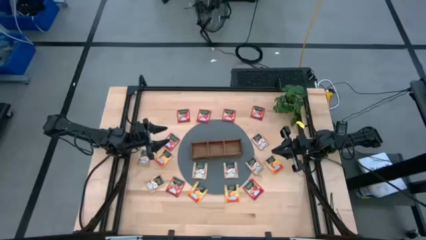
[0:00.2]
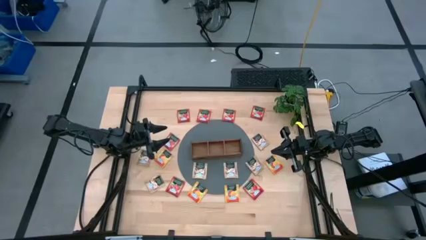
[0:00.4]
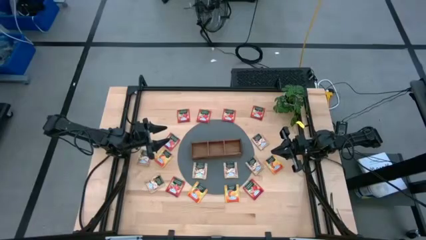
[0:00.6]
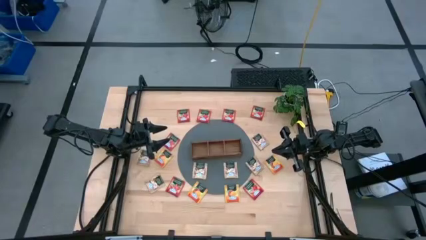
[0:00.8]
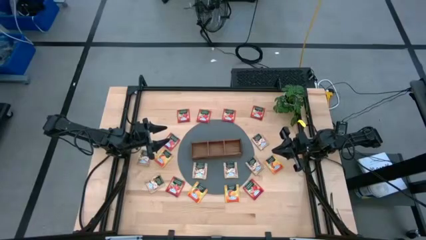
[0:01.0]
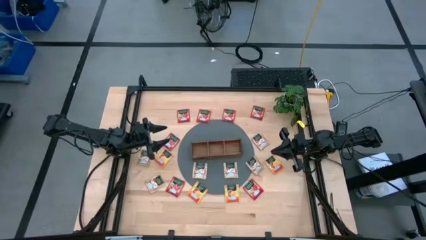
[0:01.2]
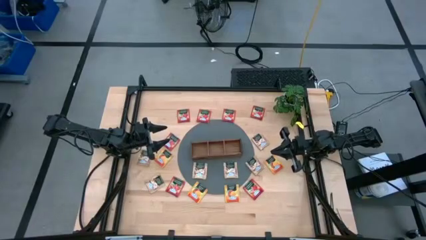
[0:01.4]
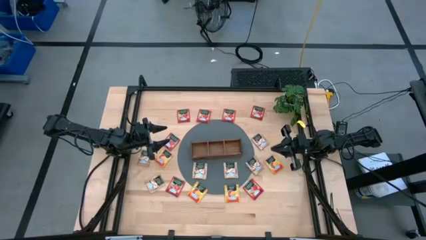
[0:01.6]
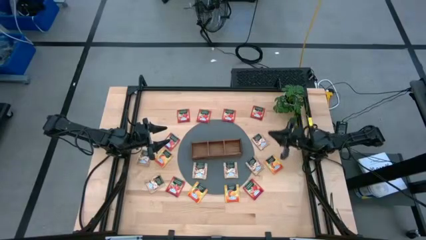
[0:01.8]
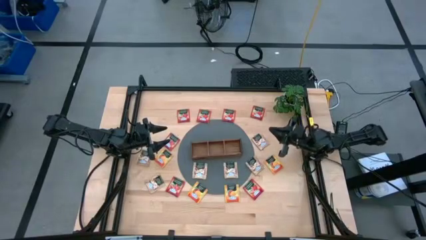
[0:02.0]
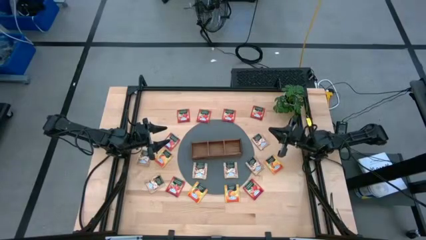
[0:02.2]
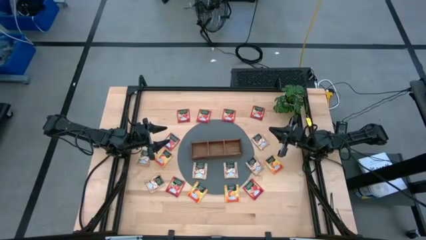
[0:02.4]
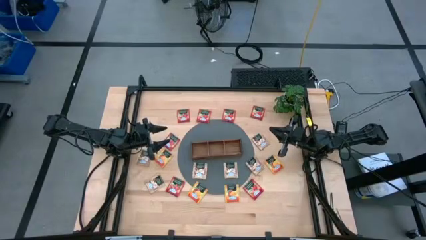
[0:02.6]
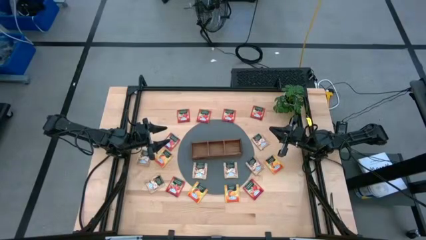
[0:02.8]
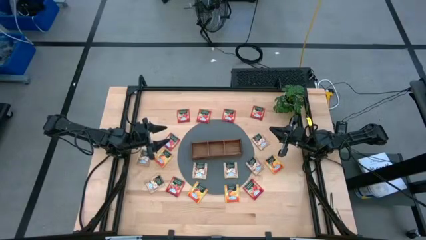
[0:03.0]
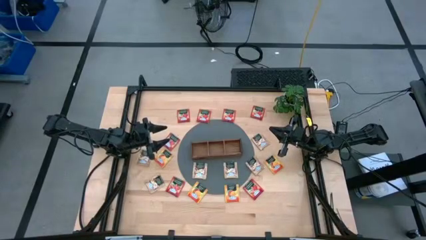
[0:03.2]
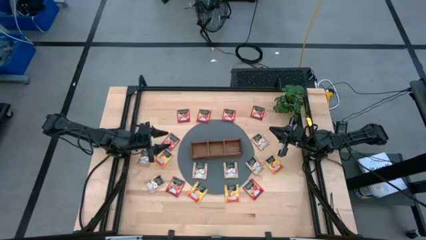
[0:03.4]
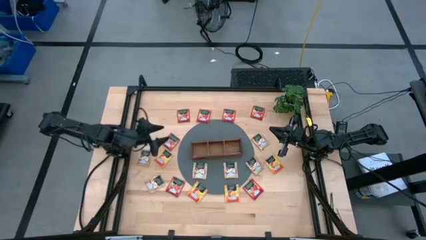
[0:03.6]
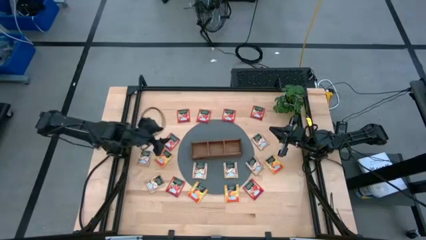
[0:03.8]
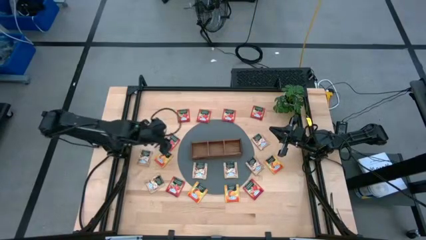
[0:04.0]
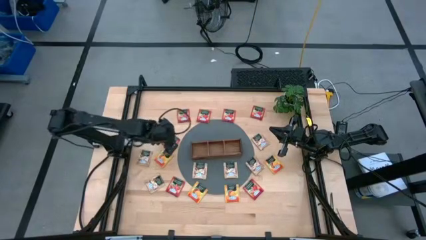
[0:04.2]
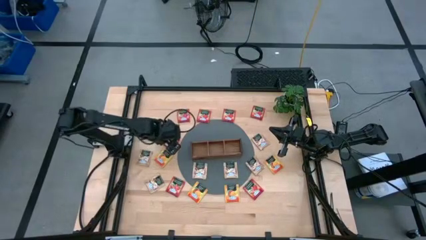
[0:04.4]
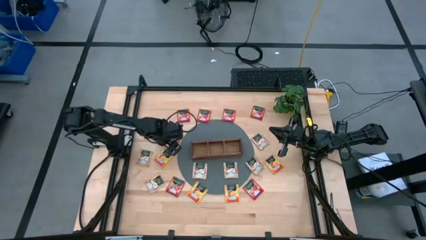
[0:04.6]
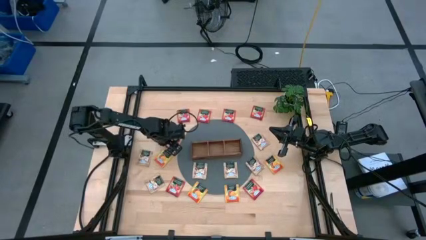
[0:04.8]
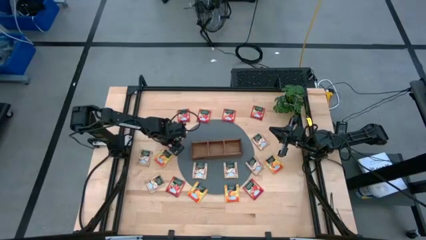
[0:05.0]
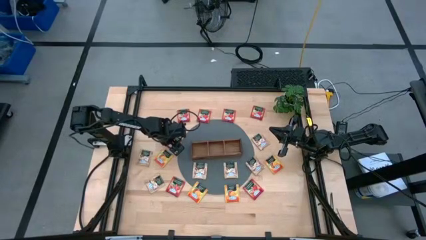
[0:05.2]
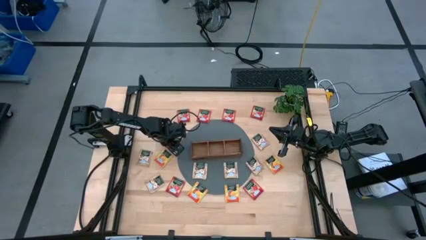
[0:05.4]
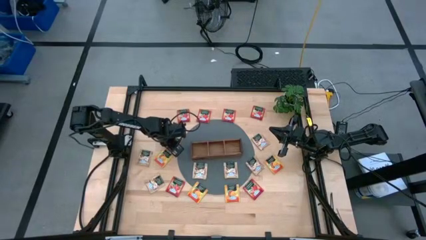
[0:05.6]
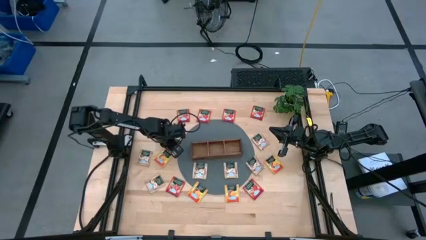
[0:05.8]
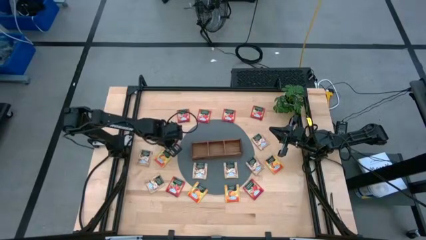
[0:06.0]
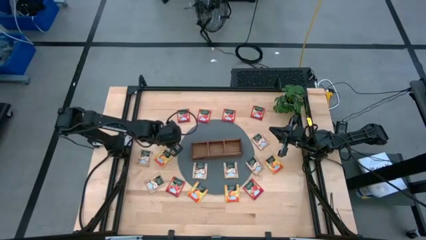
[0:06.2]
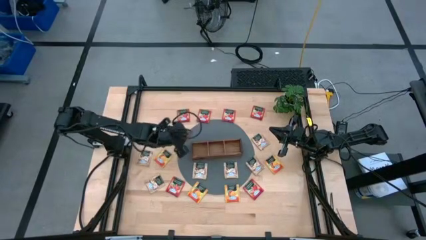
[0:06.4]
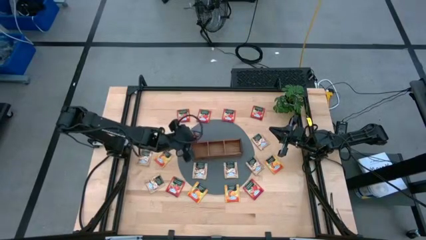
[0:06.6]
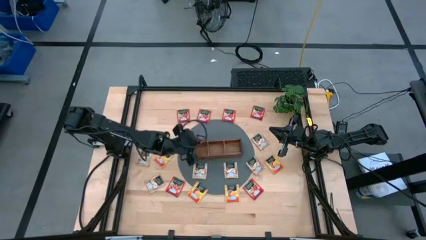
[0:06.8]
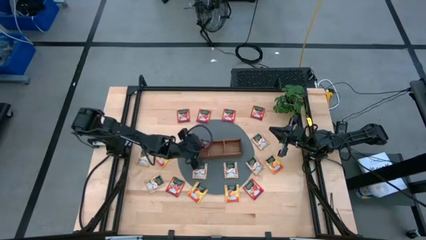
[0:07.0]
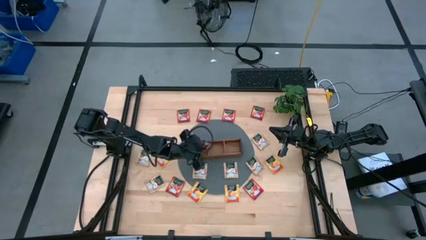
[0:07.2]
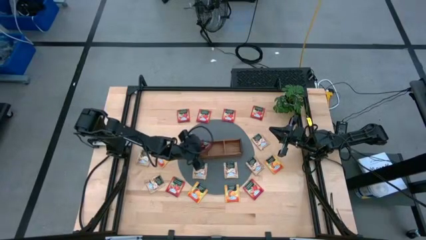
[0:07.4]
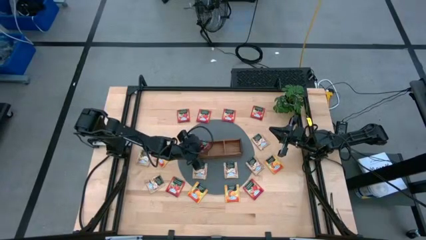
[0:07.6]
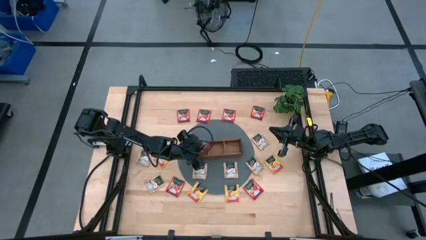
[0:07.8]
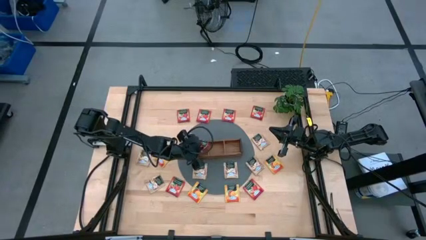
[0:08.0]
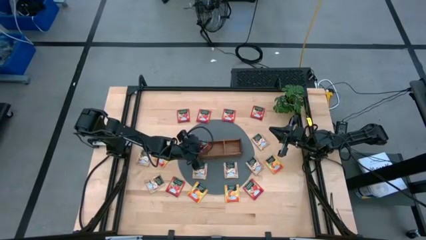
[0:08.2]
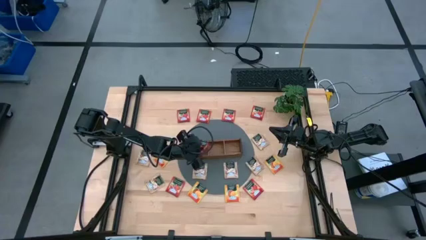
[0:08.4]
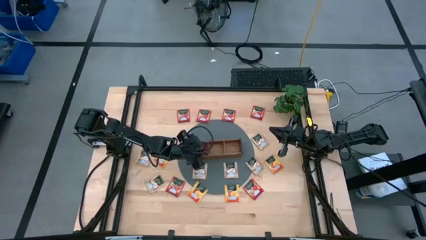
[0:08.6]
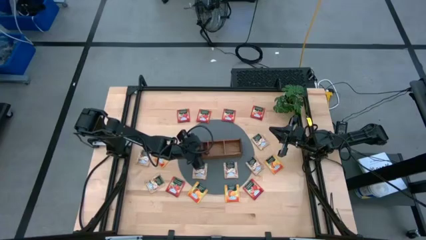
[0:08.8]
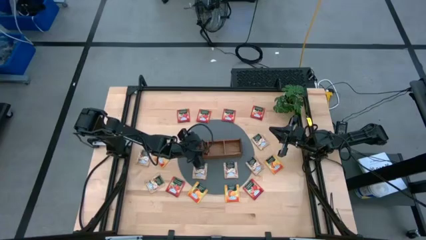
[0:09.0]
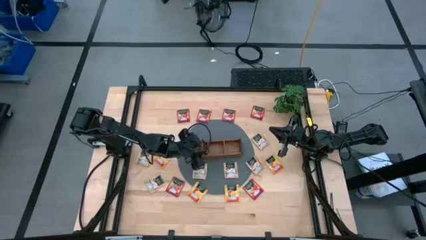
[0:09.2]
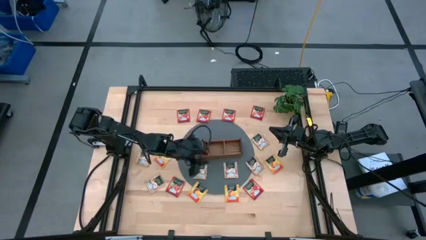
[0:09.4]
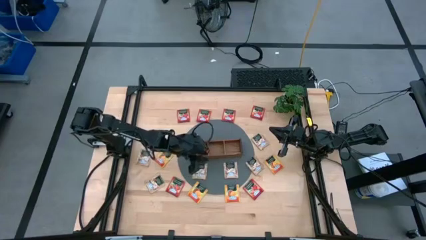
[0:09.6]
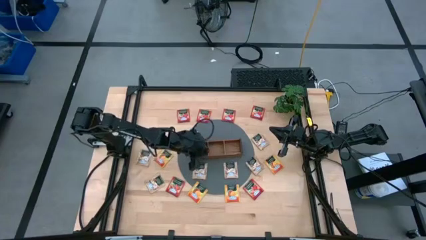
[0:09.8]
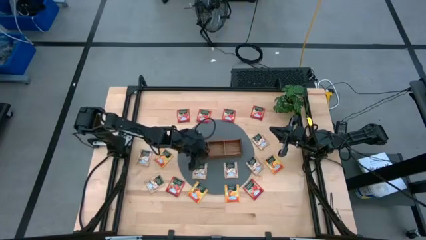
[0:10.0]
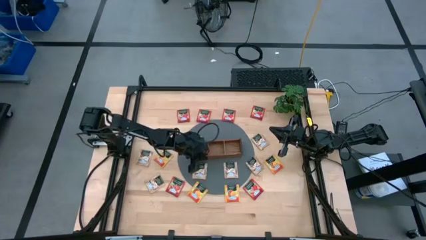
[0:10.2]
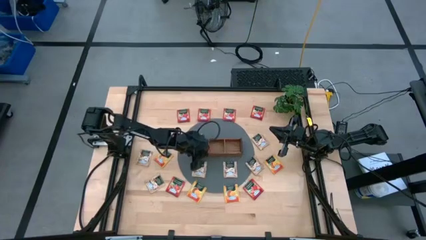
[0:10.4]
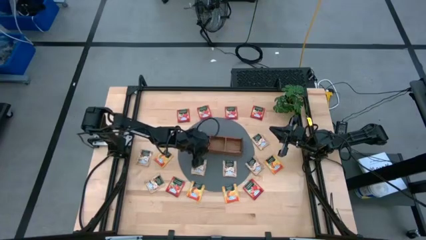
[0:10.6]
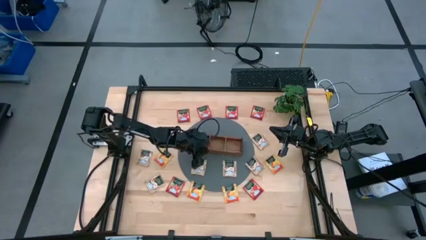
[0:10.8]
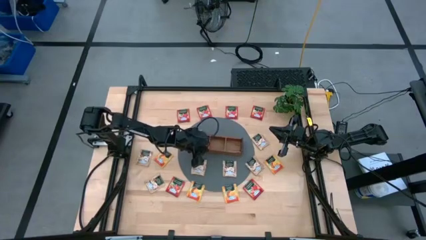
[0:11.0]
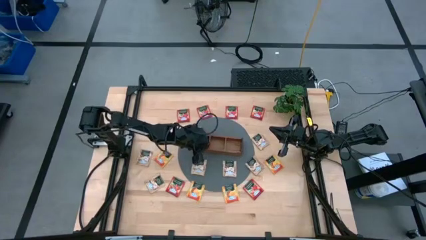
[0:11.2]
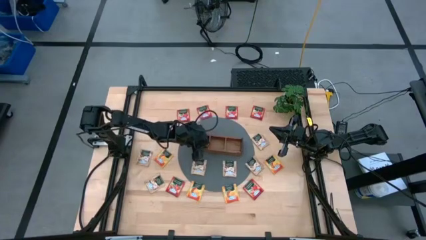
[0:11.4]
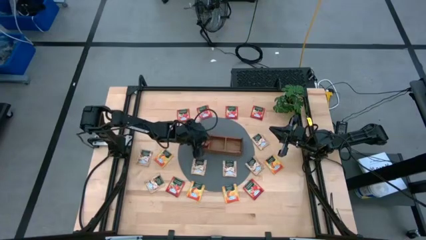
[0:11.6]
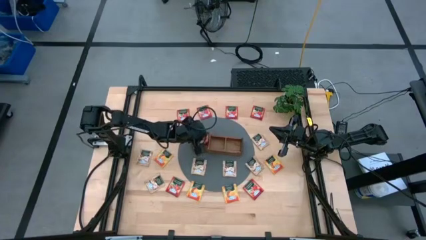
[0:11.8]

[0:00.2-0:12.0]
Task: Pick & Place Tea
Put the red tea bag into the left section of the wooden organizer

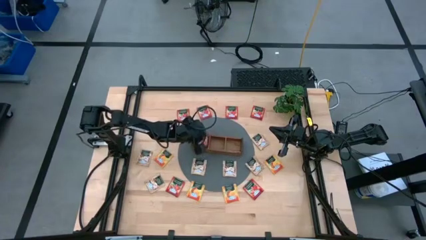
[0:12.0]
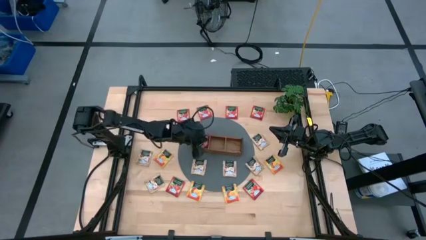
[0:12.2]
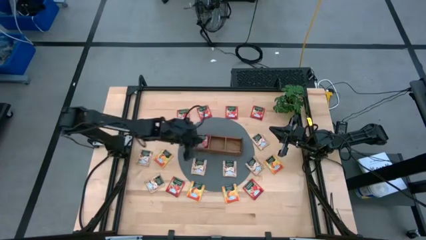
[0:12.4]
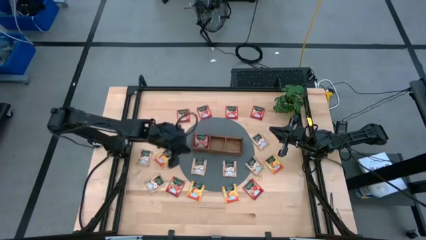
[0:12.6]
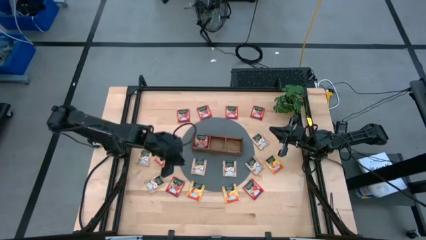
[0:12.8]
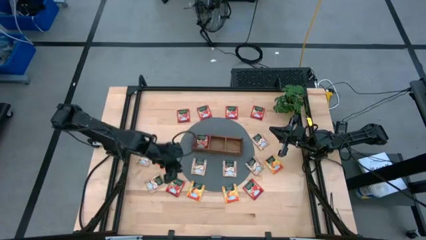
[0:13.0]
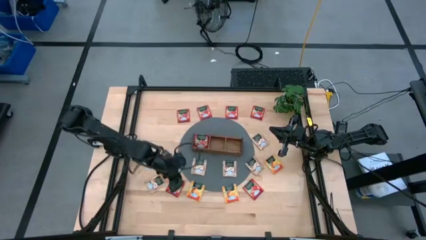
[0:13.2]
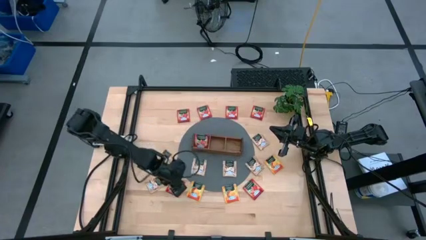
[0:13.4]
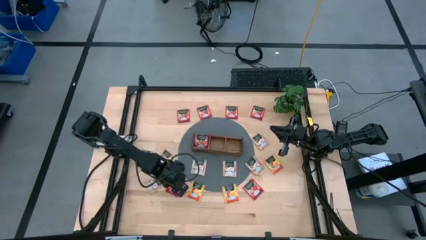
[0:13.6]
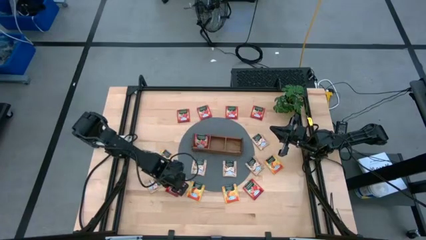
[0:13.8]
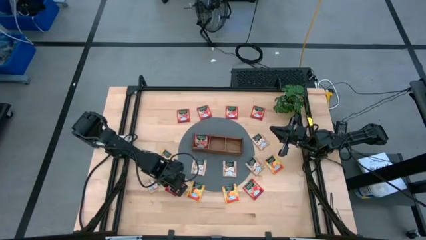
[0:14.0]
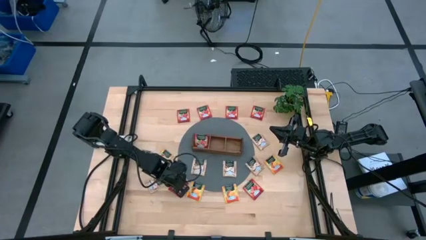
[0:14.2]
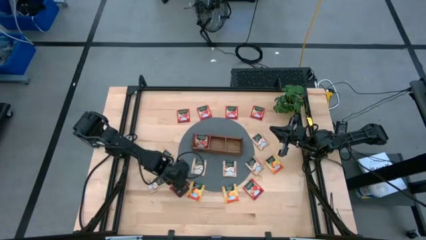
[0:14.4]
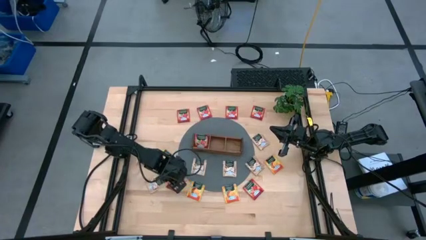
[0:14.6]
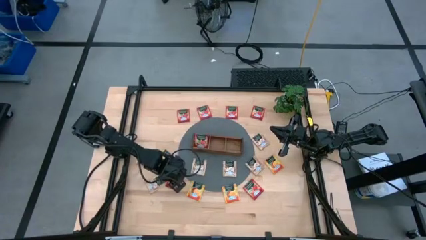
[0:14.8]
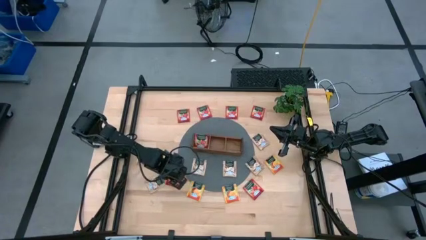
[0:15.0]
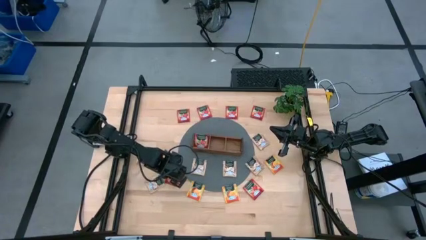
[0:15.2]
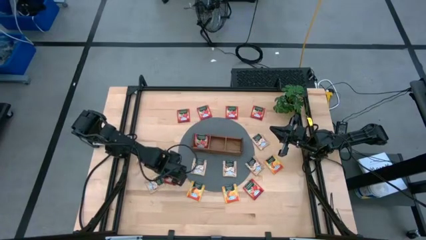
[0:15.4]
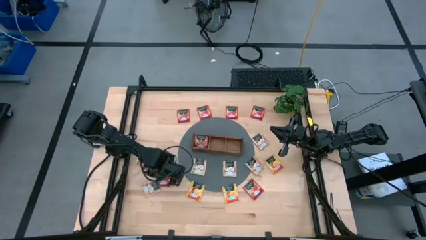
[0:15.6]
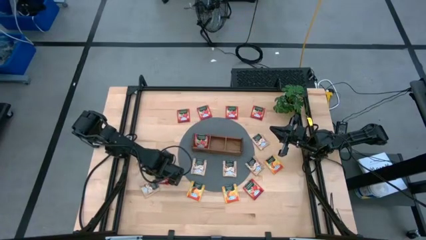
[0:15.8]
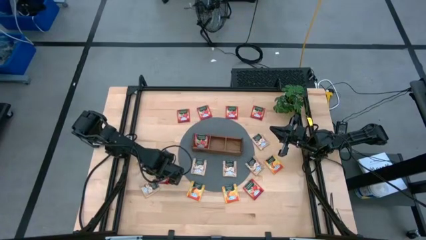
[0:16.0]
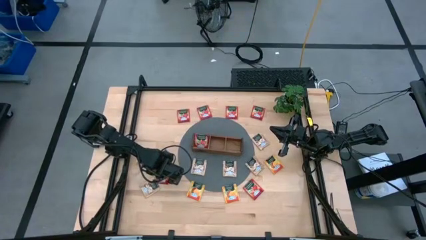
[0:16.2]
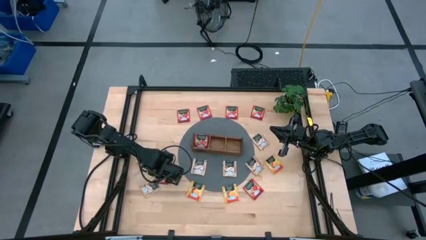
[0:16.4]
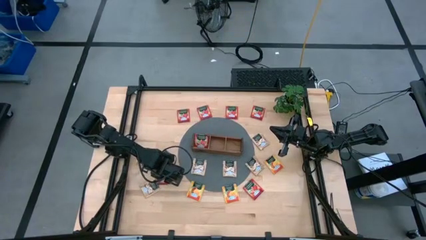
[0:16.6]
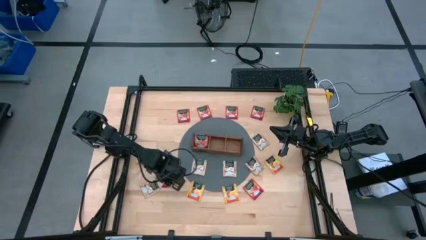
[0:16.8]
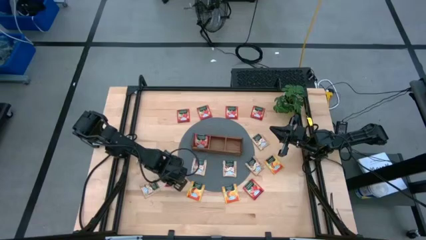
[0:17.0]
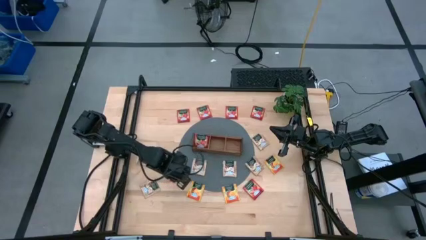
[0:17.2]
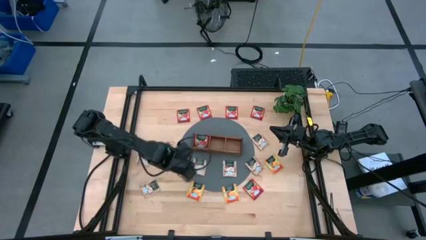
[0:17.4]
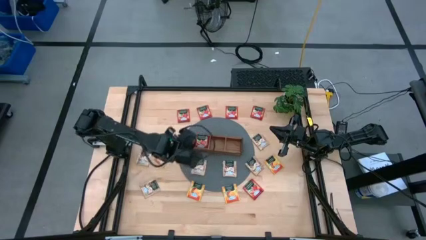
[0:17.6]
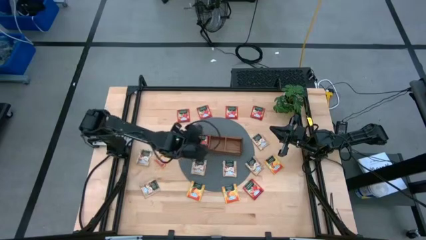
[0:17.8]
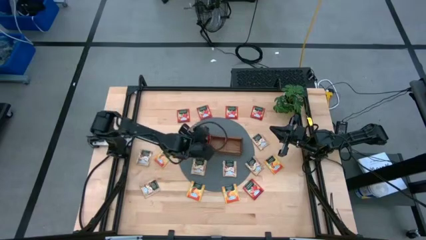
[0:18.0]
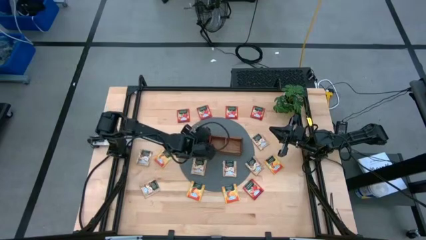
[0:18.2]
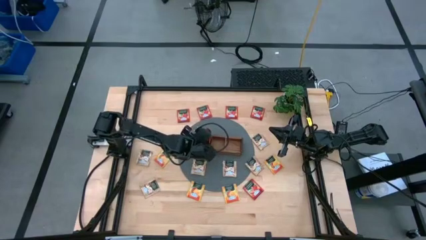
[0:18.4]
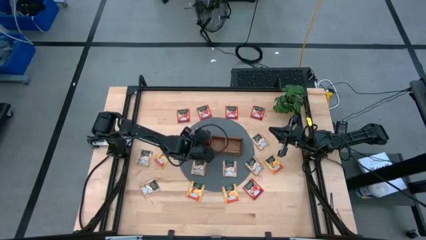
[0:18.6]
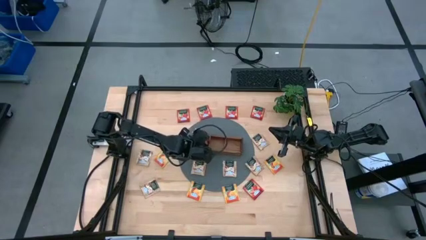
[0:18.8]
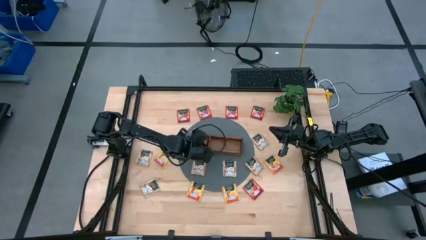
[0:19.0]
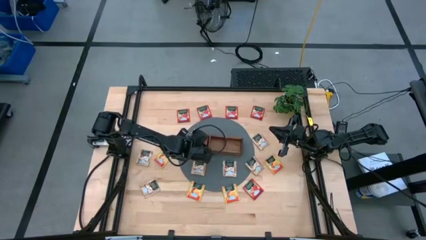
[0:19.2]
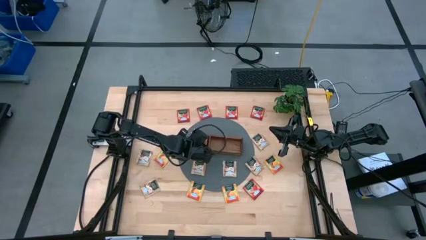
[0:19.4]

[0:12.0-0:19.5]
Put the red tea bag into the left section of the wooden organizer
